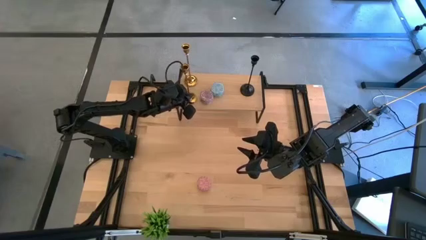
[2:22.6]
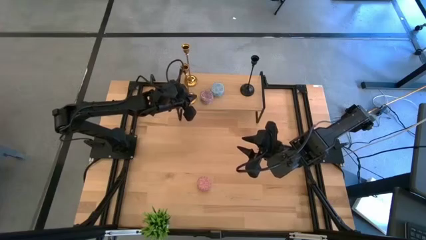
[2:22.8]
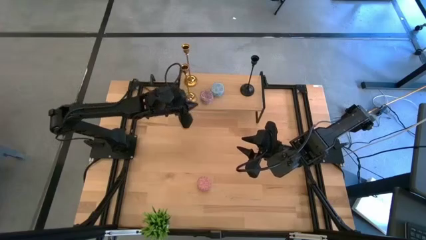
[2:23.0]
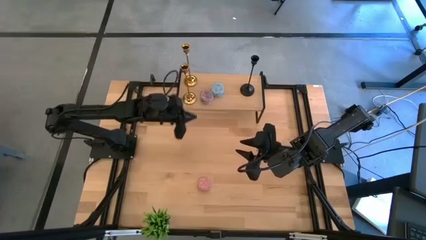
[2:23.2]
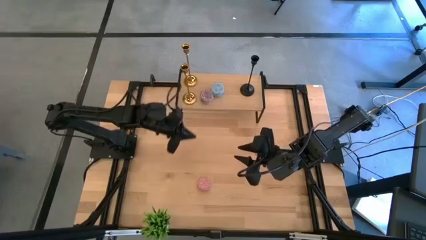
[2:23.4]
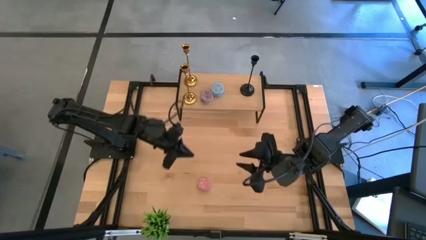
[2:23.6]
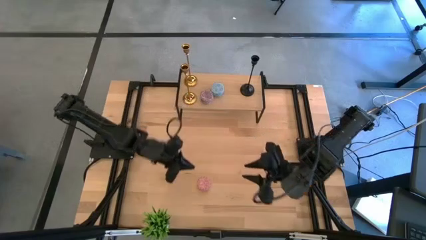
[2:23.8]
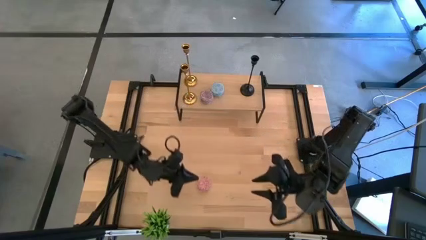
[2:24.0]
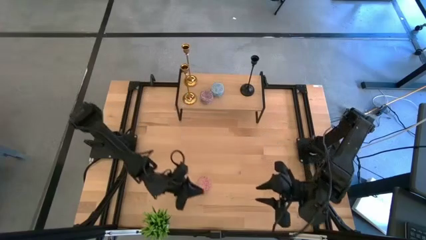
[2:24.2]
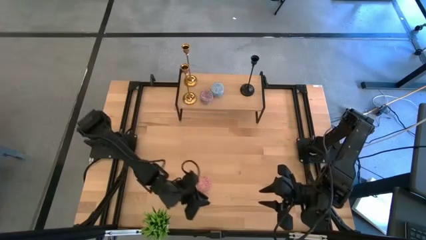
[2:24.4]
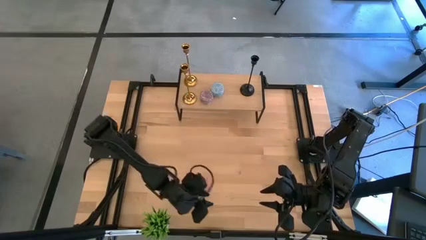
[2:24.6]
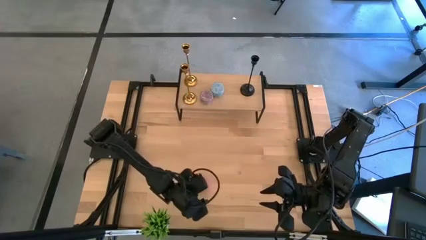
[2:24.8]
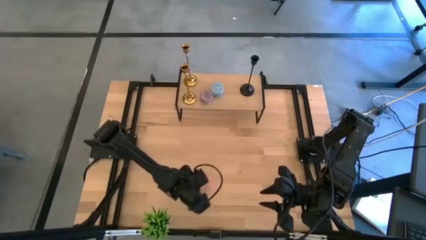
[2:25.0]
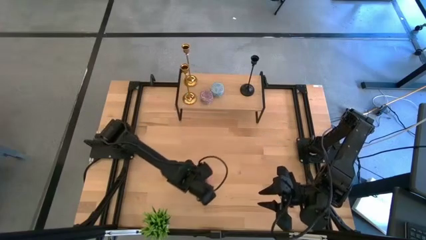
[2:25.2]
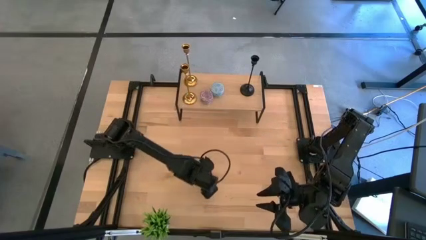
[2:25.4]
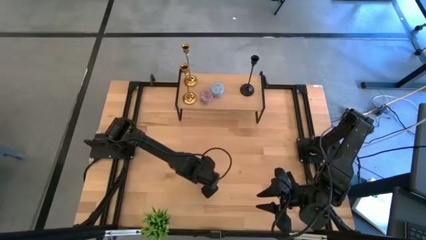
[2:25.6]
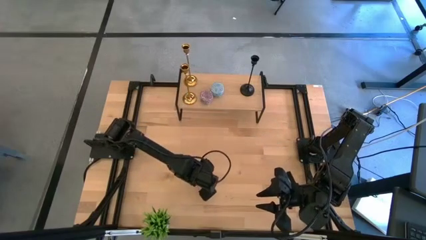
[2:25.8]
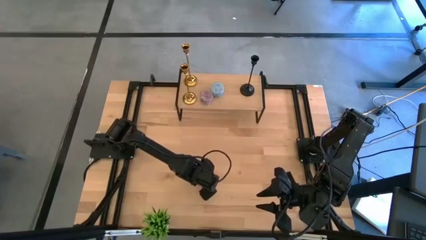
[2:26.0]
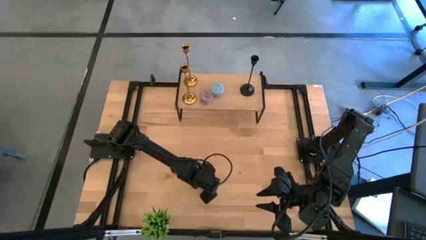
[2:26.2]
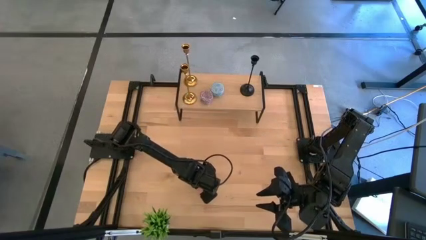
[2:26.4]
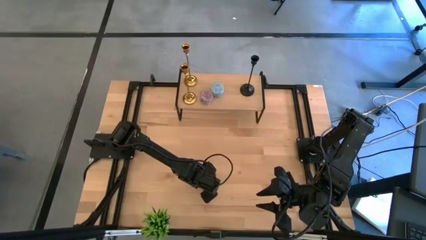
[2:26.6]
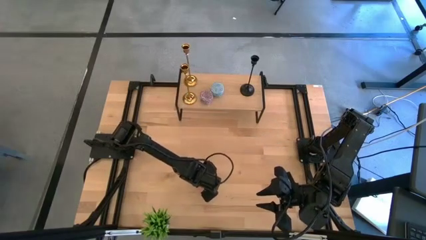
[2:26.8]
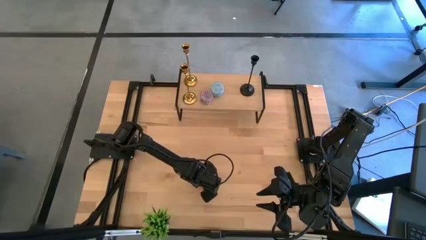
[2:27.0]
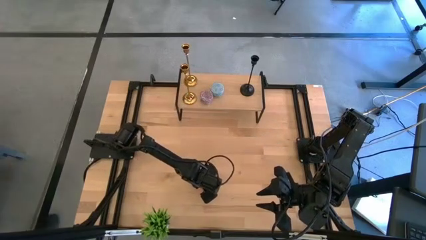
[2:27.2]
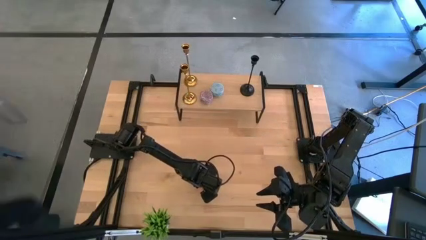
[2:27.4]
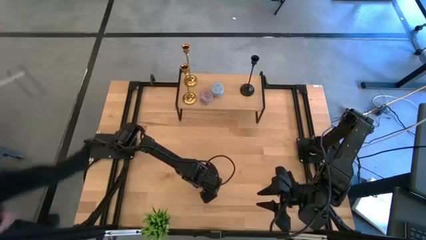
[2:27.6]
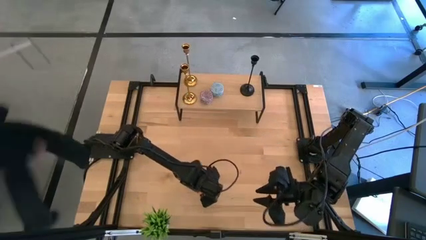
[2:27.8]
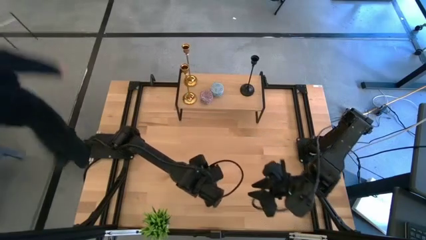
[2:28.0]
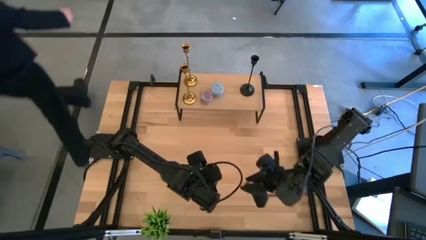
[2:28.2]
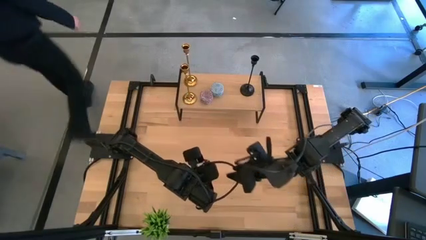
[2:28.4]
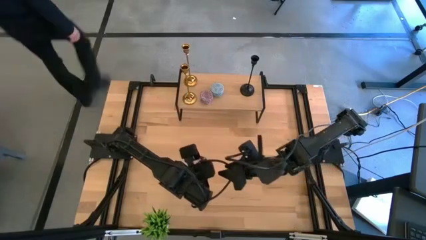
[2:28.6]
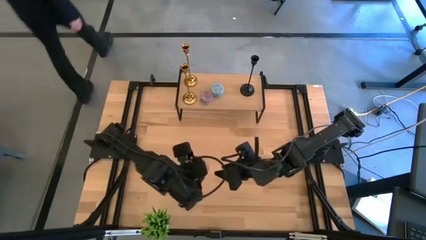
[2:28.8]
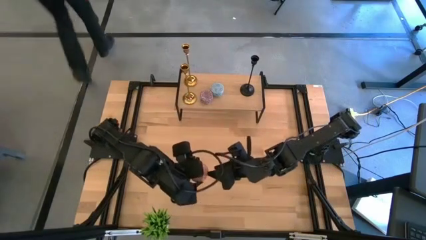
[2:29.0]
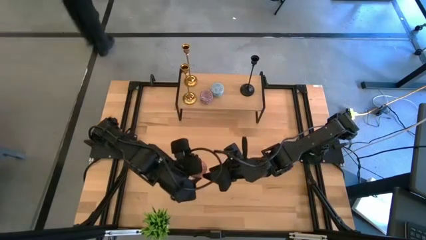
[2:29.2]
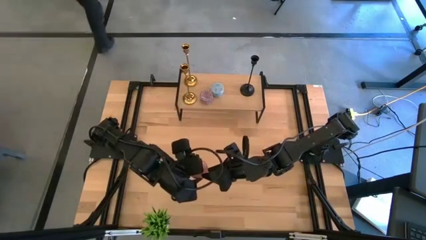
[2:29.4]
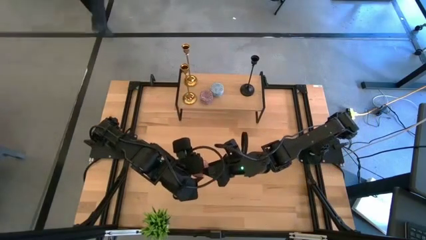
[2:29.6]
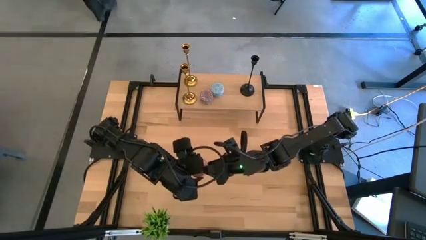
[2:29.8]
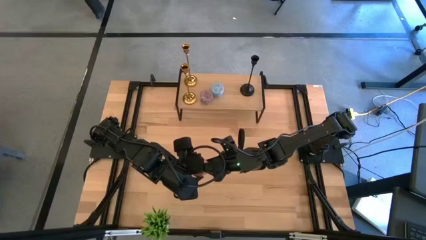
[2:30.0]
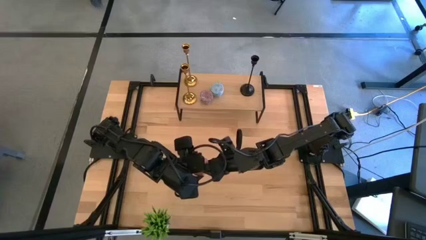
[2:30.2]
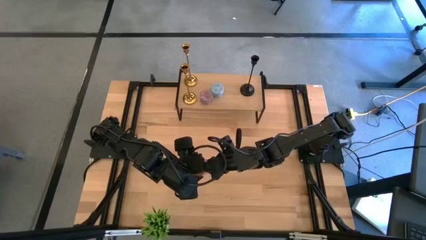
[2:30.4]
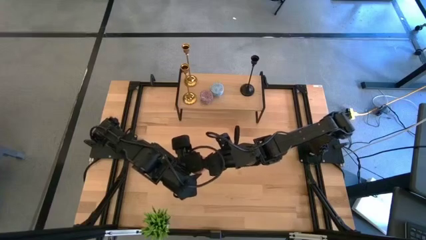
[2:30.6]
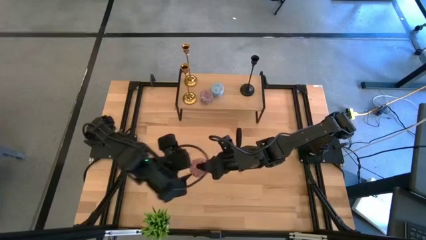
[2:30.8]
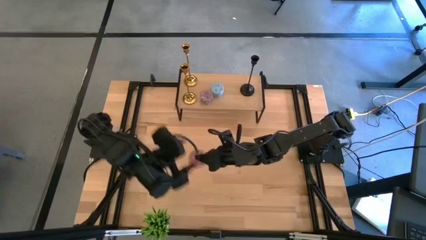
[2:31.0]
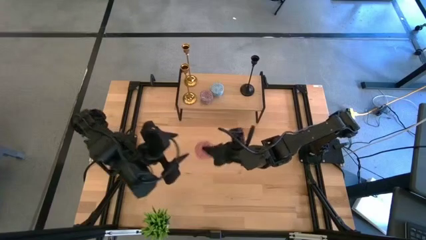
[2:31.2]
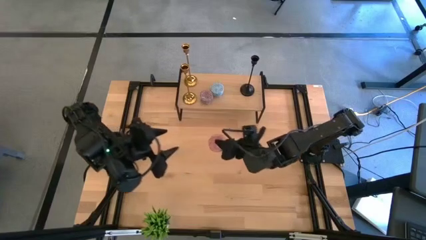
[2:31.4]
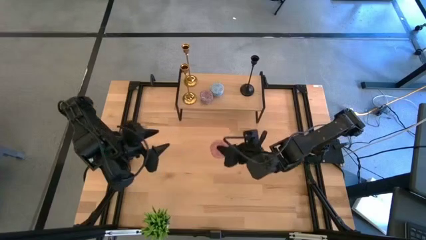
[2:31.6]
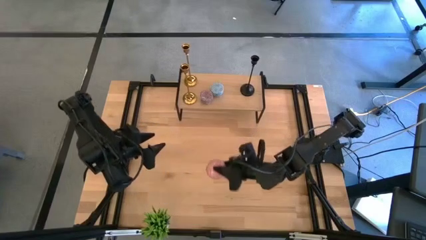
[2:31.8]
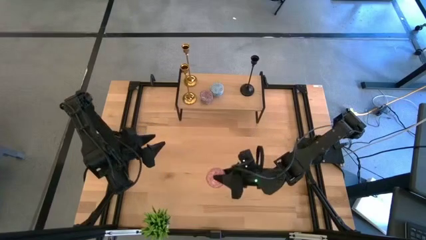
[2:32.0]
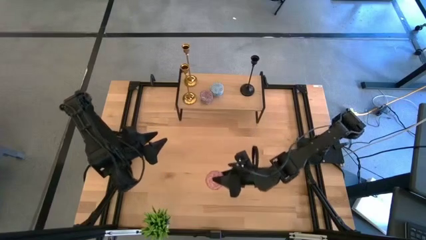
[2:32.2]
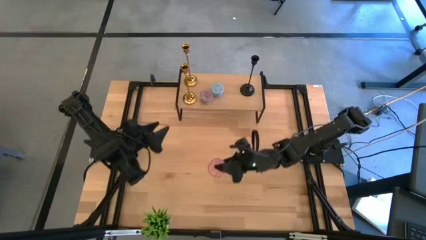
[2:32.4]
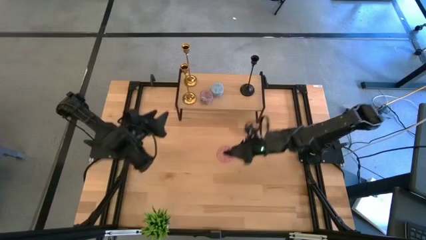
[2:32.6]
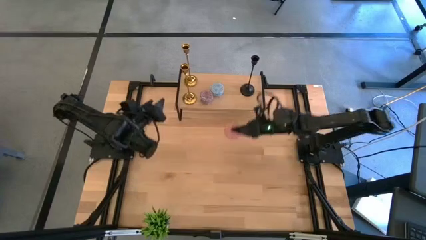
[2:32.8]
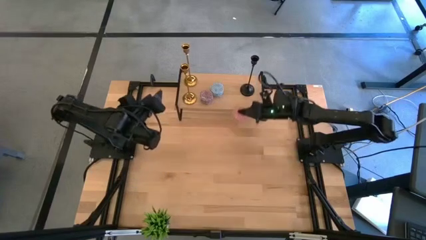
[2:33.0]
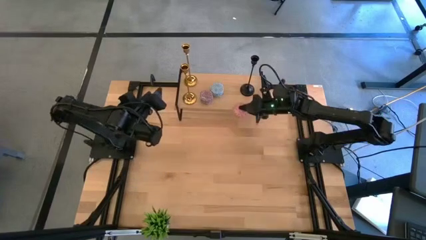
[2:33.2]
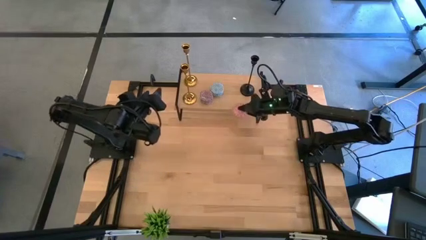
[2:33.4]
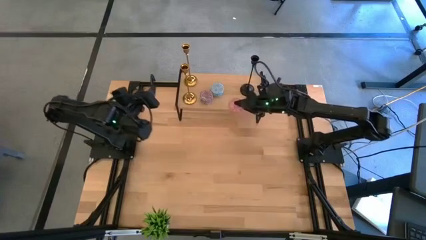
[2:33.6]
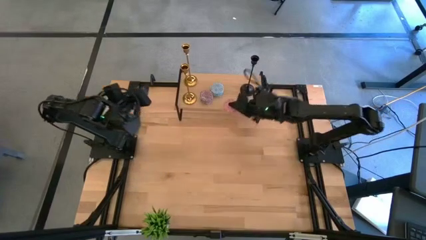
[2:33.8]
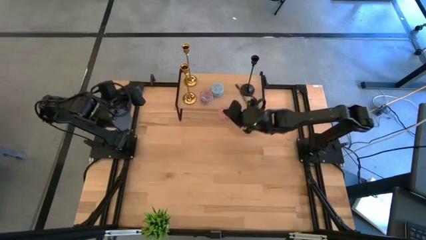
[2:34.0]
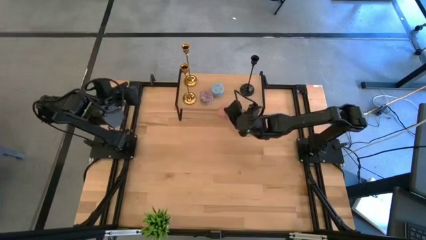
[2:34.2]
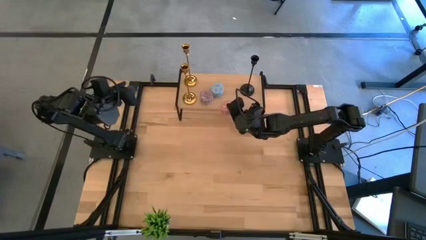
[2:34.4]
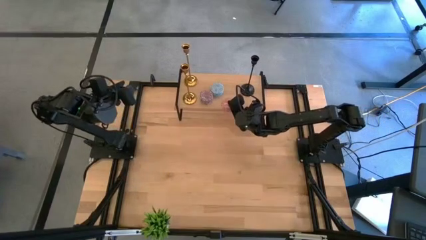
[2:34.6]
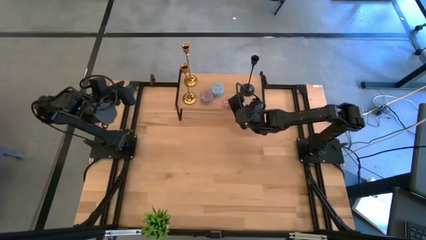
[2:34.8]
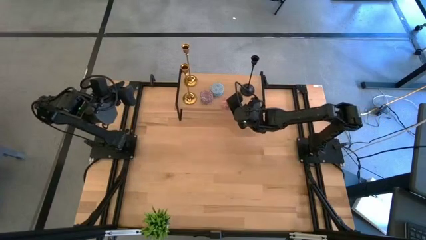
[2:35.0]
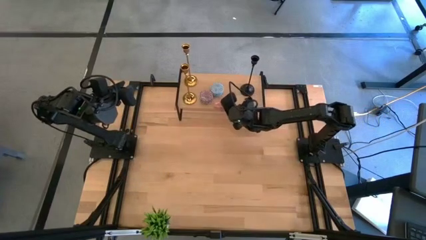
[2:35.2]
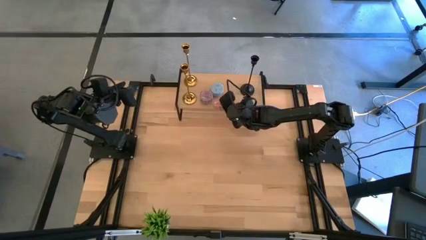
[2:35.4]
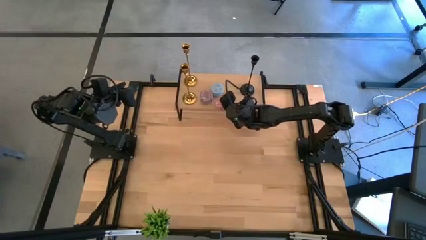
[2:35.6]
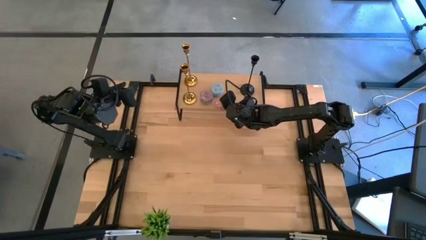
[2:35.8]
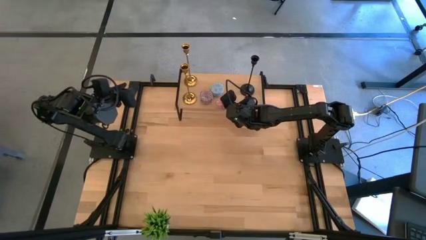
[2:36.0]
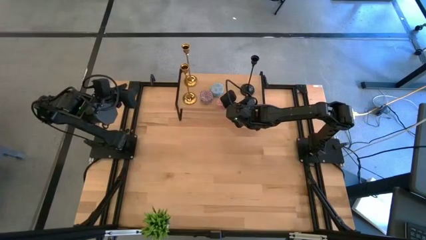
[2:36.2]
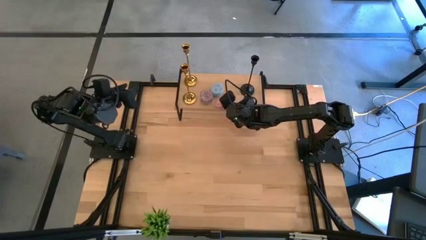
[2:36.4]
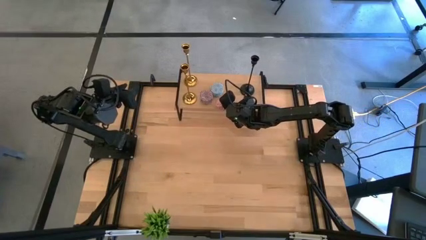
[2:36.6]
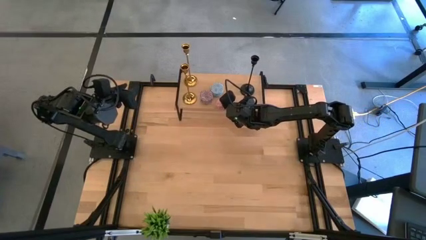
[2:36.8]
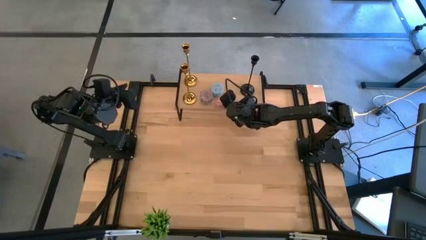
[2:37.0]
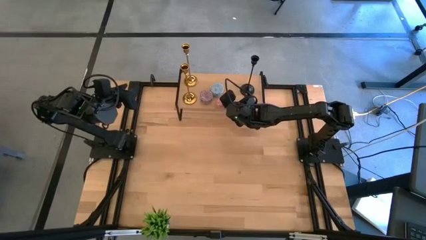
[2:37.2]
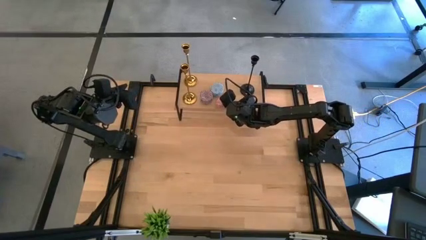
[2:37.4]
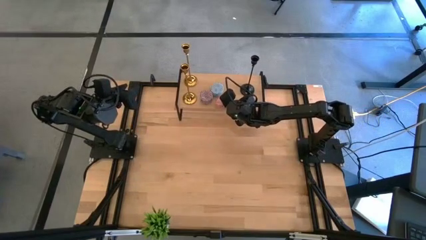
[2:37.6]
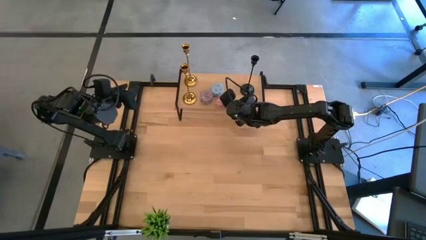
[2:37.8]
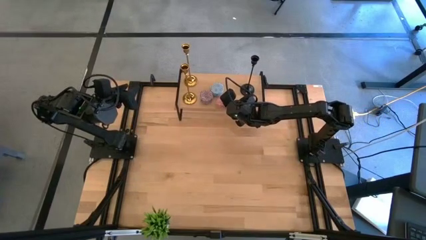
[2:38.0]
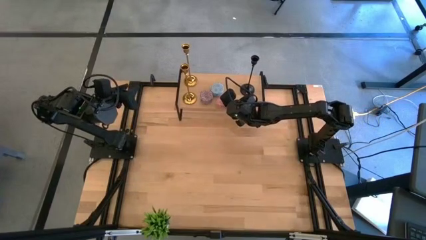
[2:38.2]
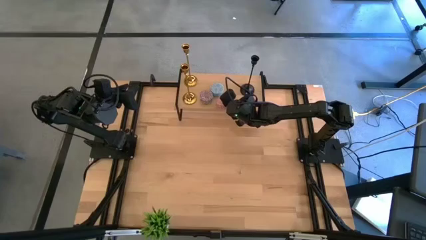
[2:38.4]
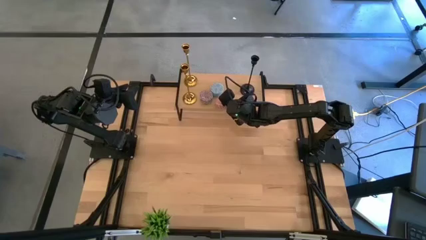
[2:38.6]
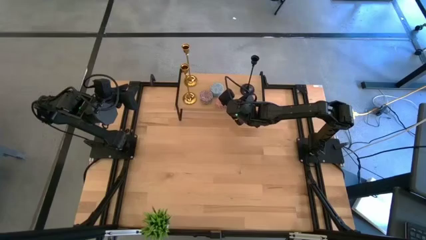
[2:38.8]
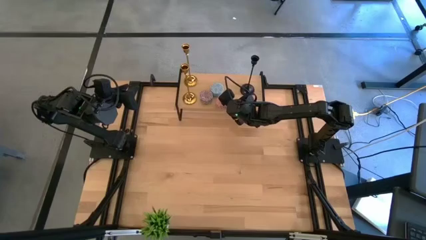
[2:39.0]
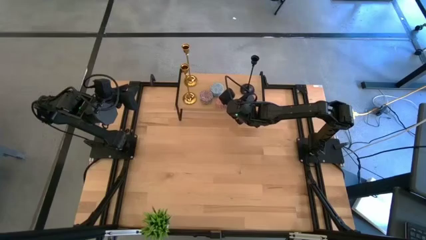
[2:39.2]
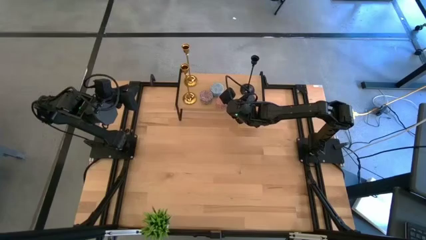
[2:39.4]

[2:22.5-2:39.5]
Task: Pick & Place candle stick holders
Put the pink scented candle on the shelf
